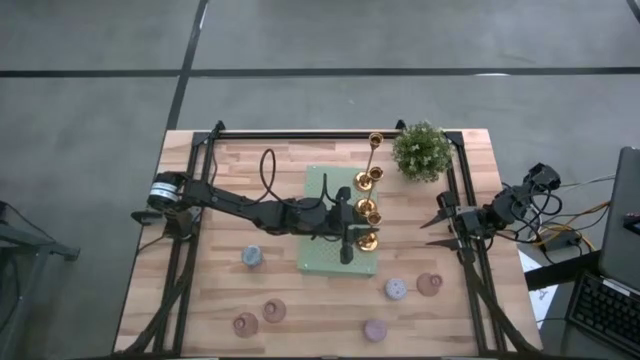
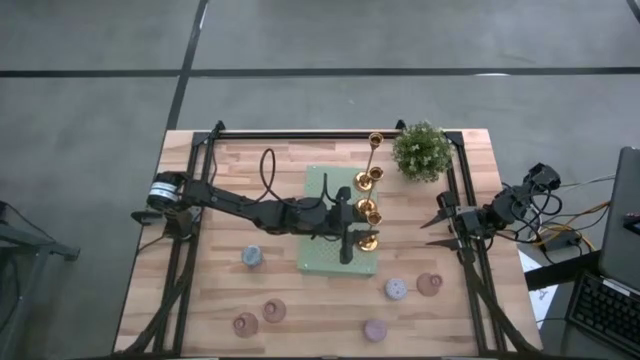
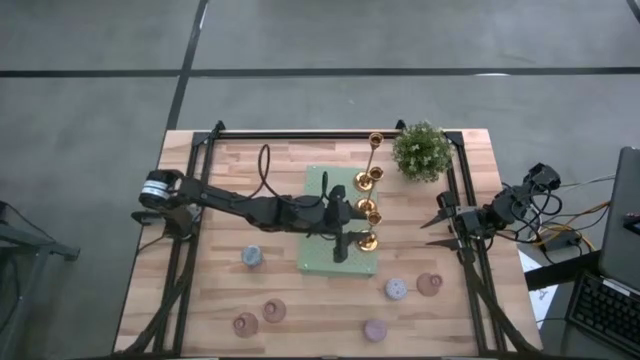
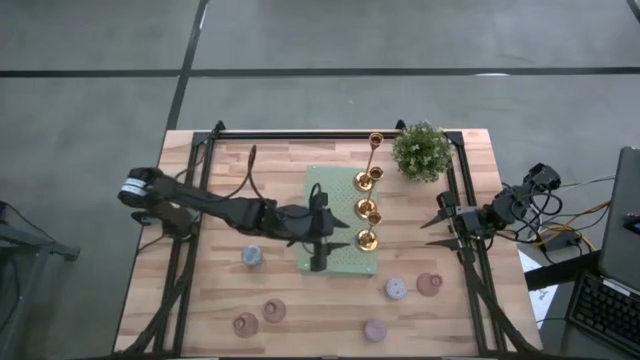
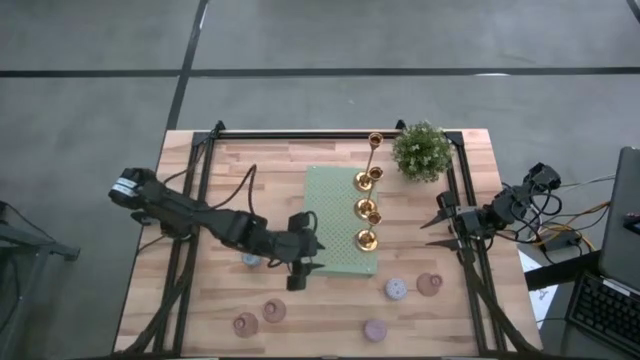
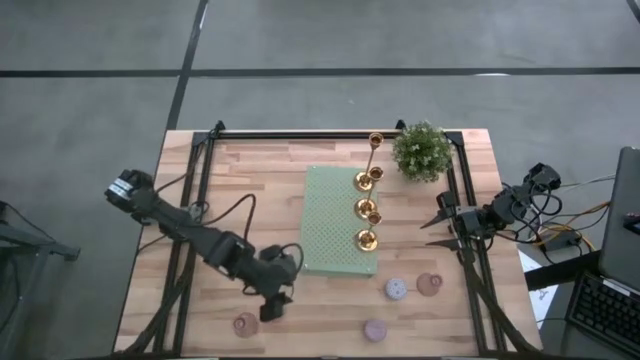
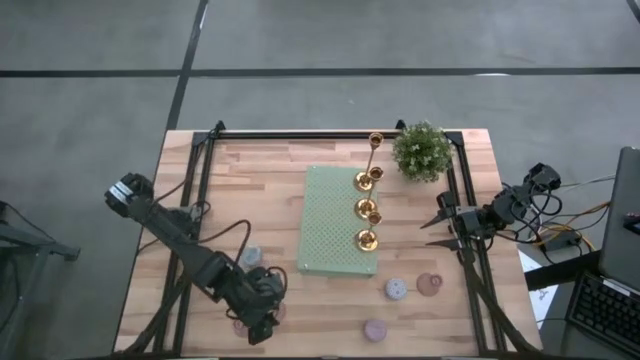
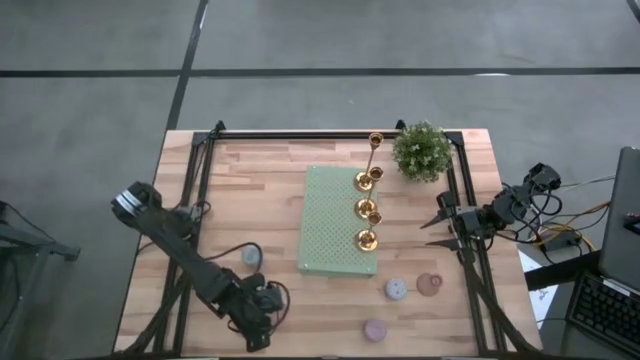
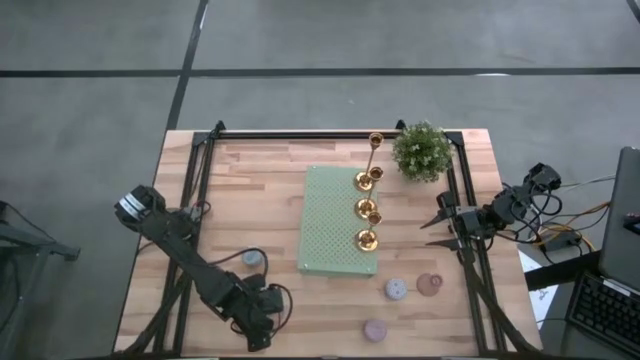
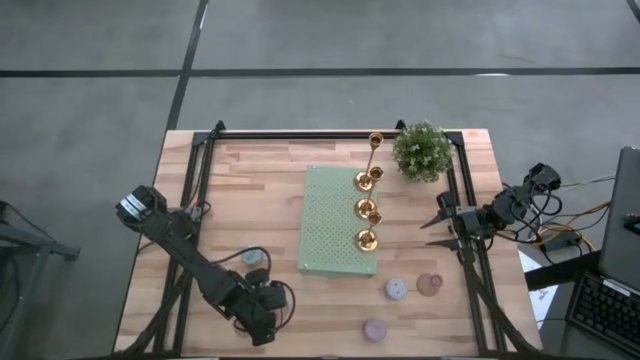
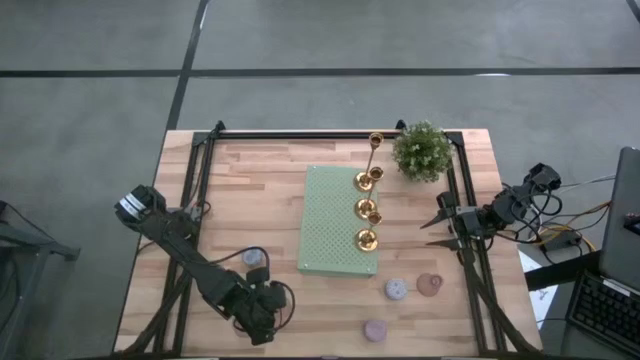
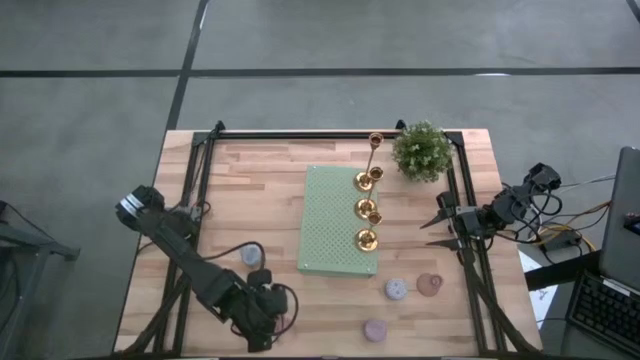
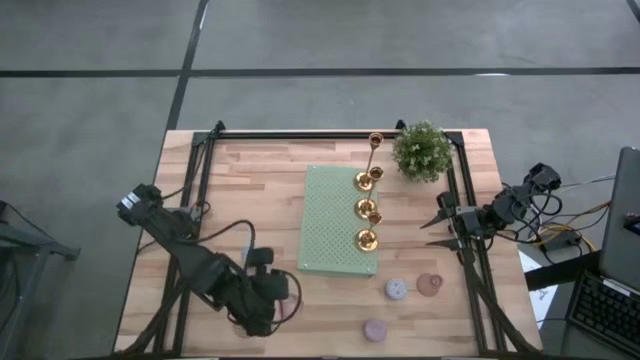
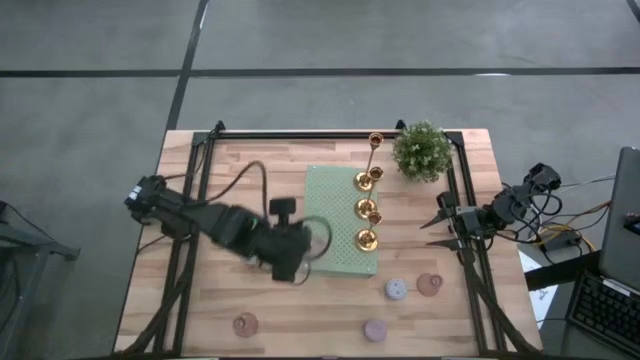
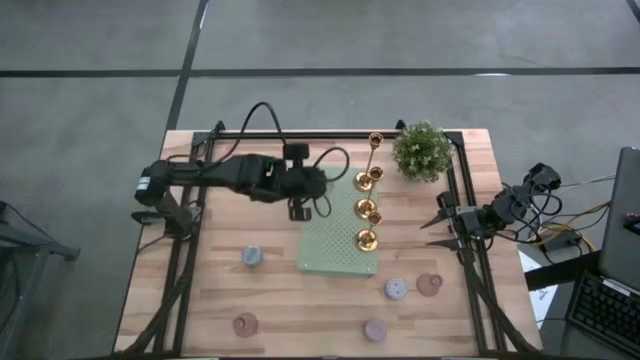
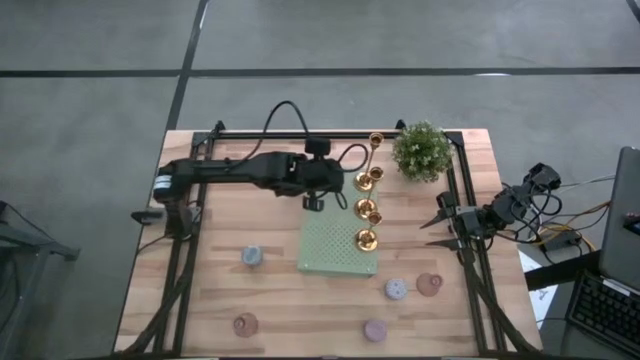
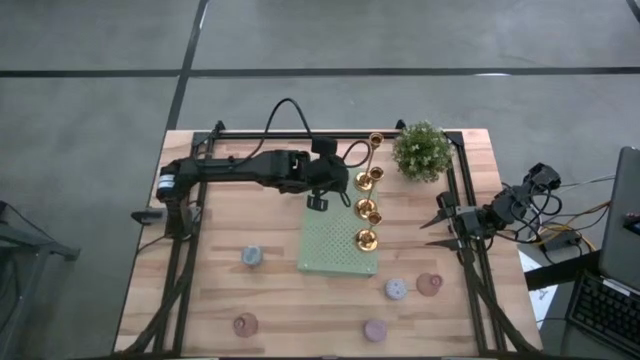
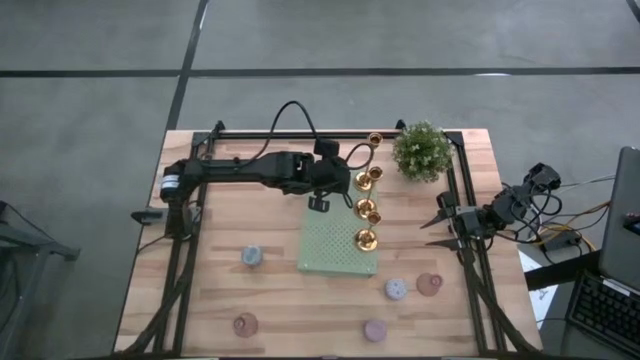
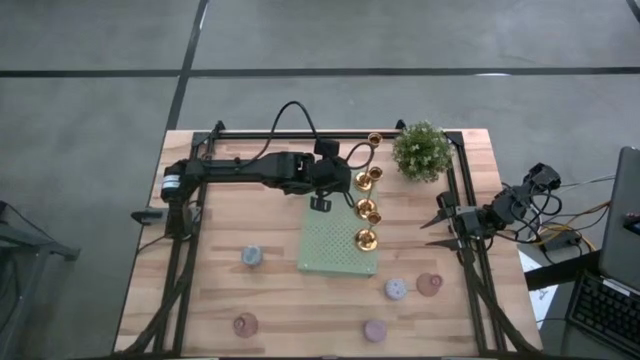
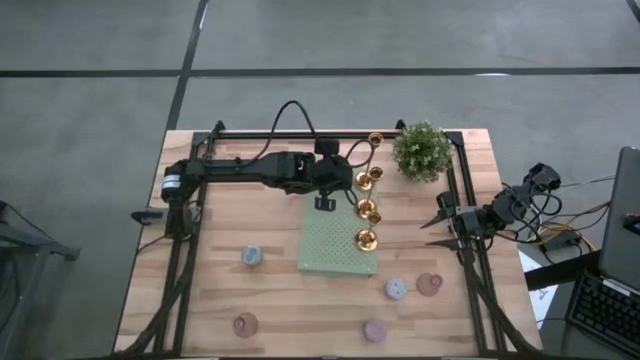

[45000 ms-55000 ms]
Task: Pick & Place candle stick holders
Put the middle purple vase on the shelf

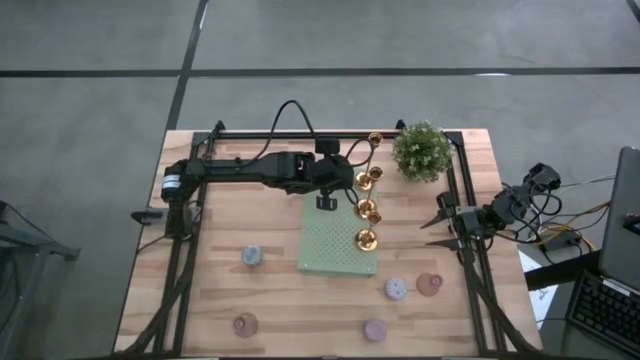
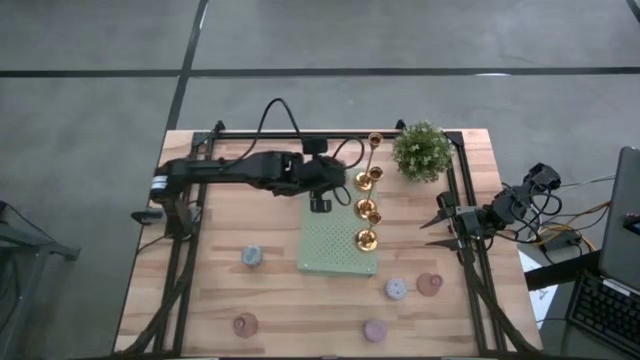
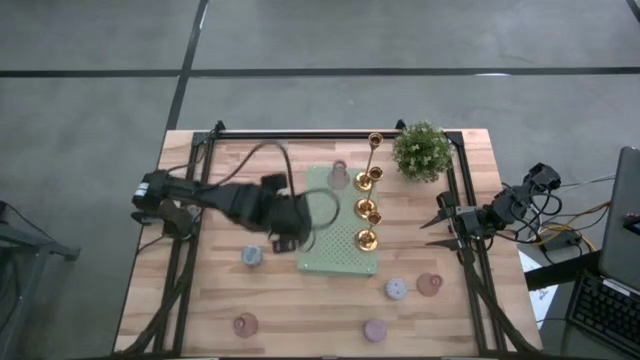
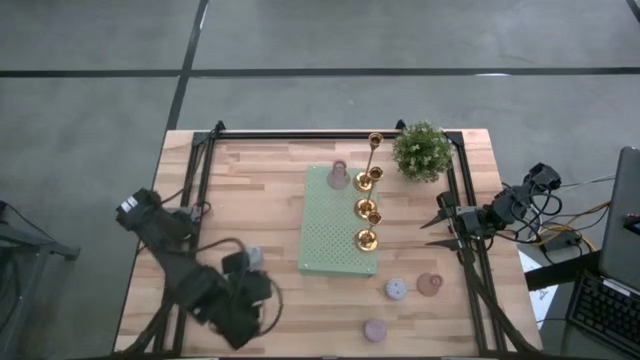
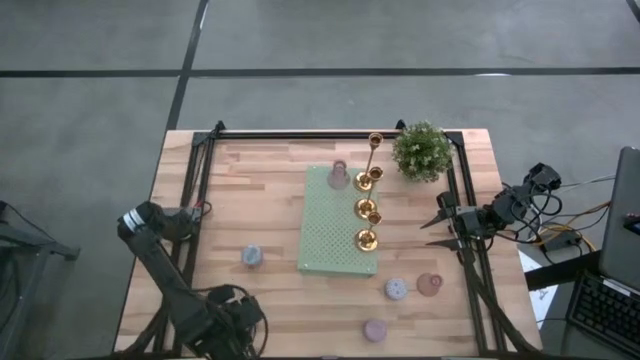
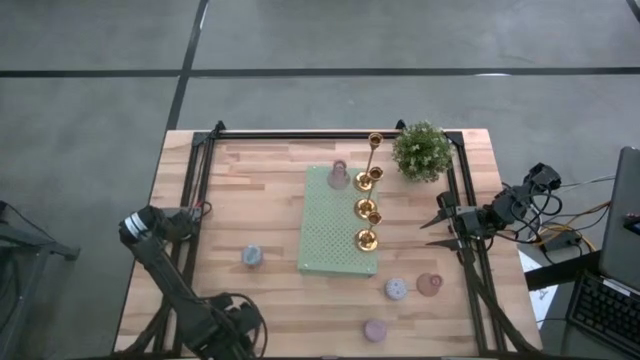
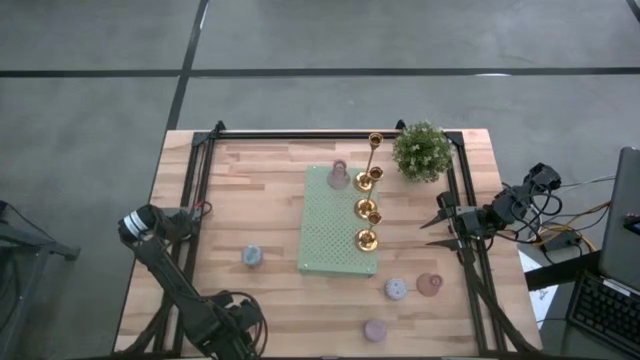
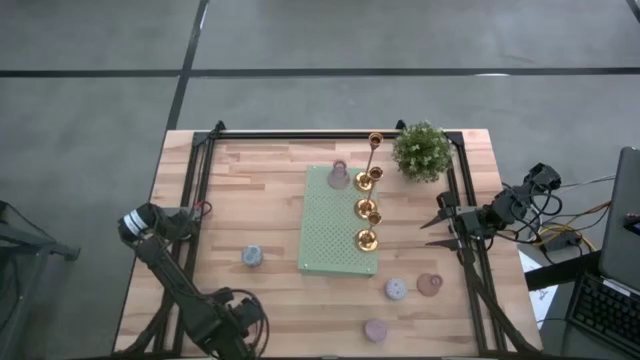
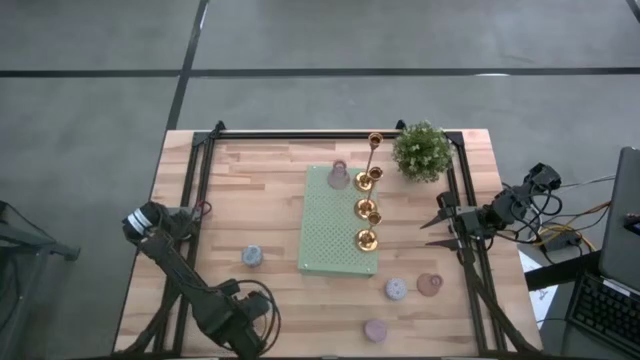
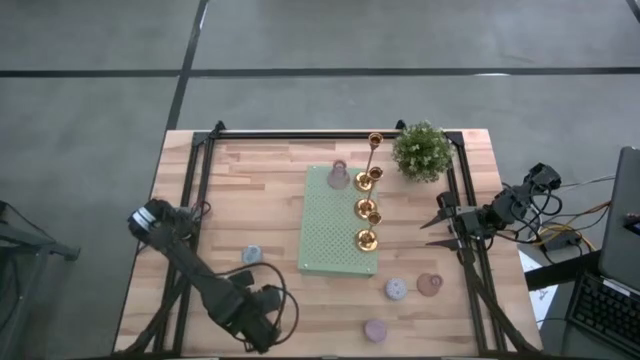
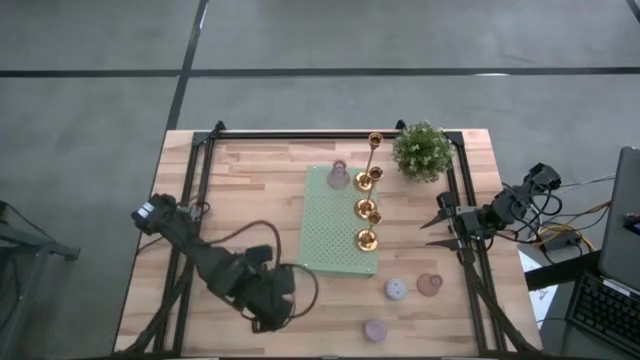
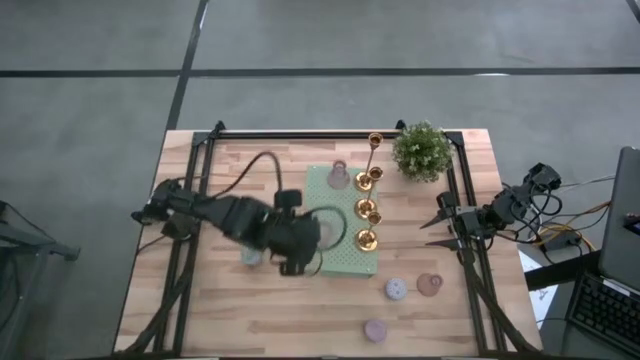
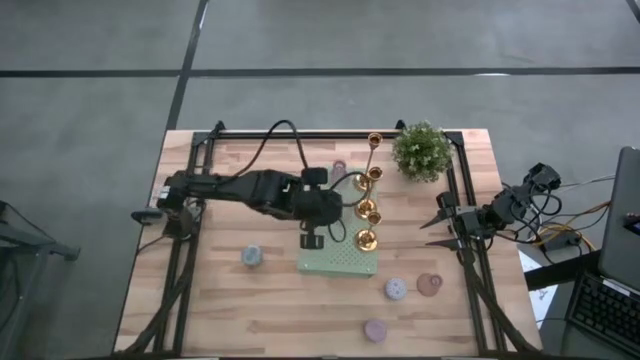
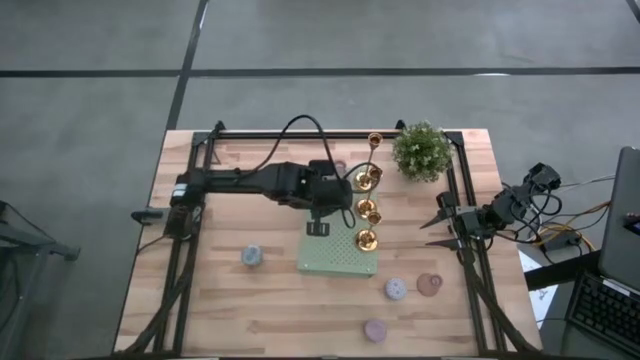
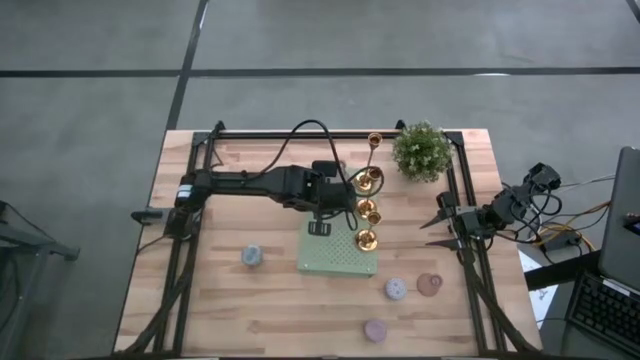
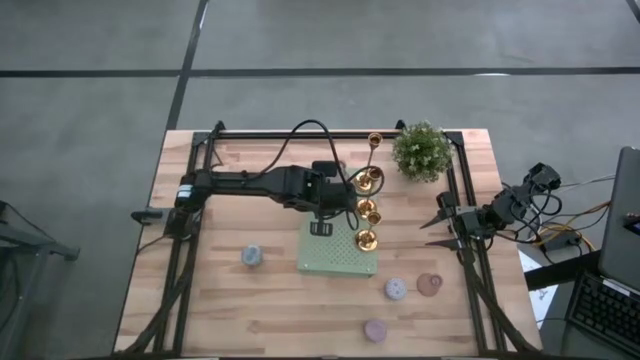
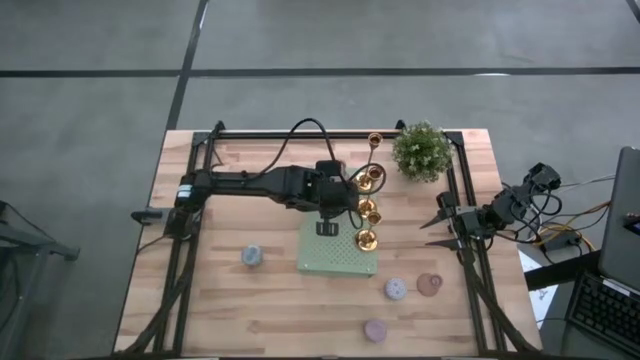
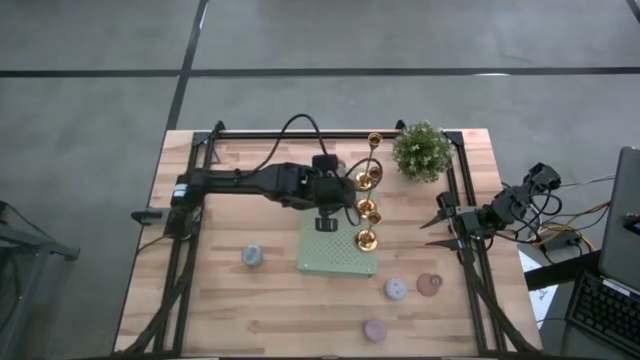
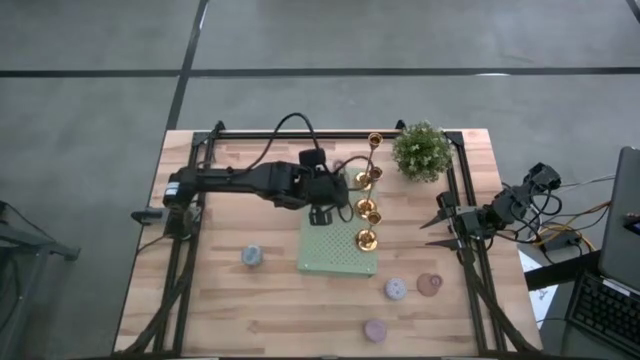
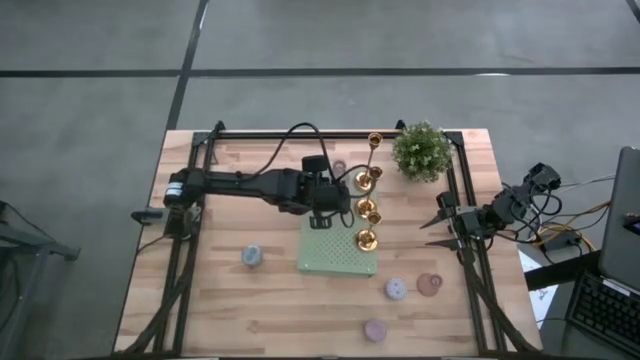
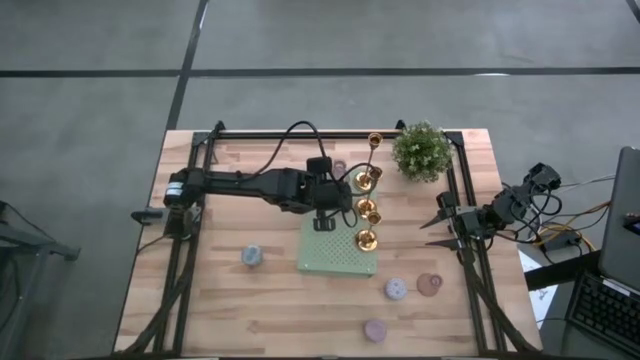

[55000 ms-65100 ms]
Put the left purple vase on the shelf aligned with the other purple vase

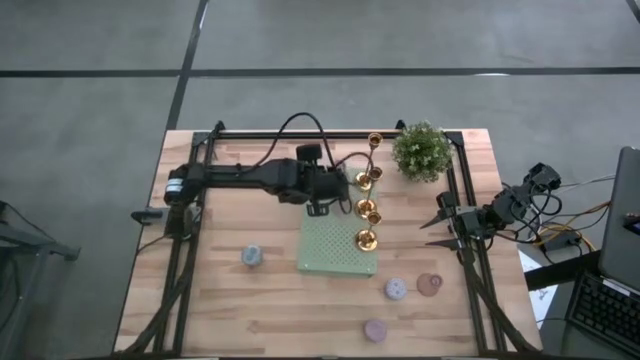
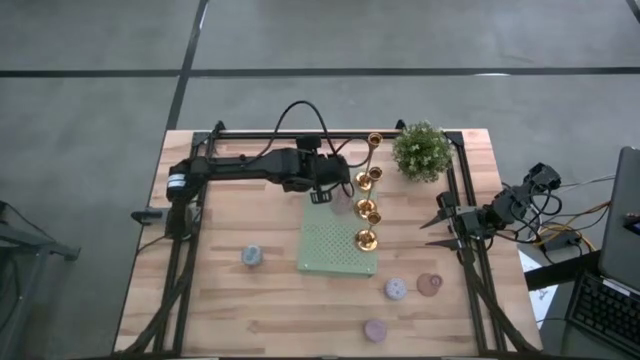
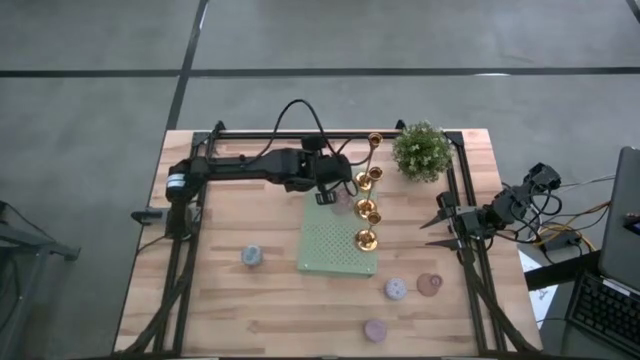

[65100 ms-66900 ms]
Adjust the purple vase on the shelf

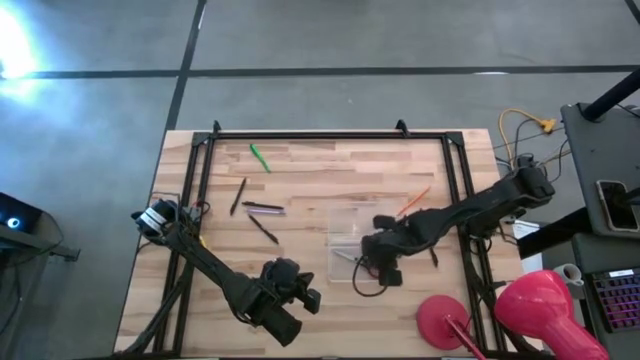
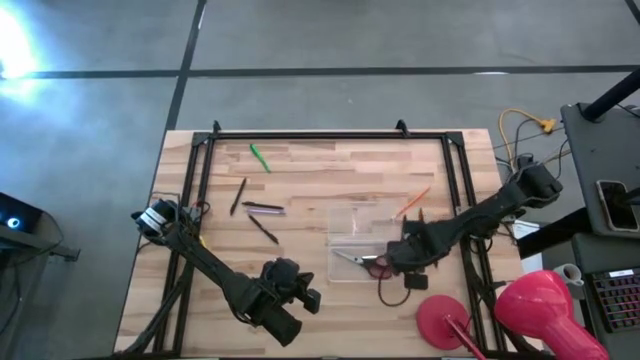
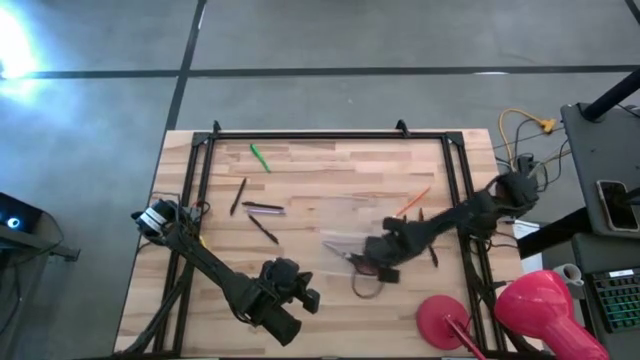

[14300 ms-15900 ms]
Task: Pick & place school supplies into a supply box
Move the transparent supply box to the center of the table
